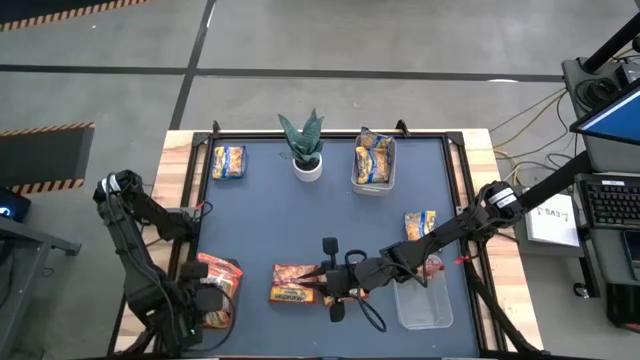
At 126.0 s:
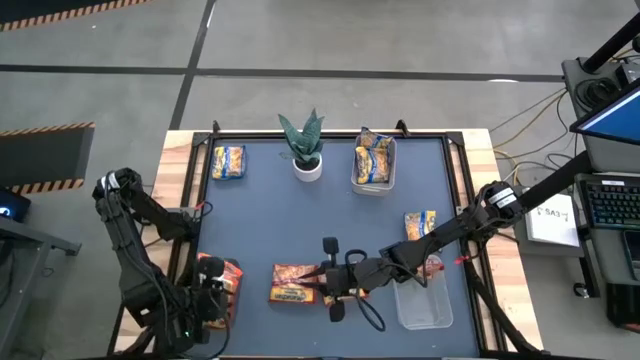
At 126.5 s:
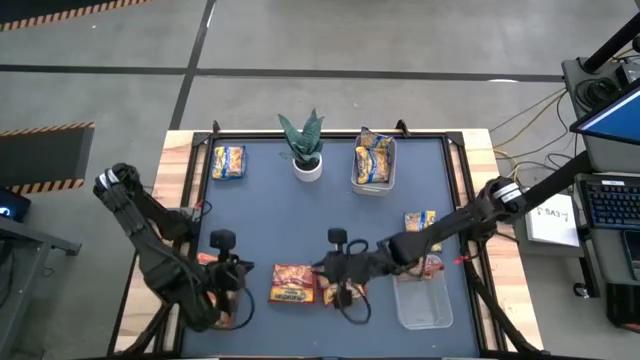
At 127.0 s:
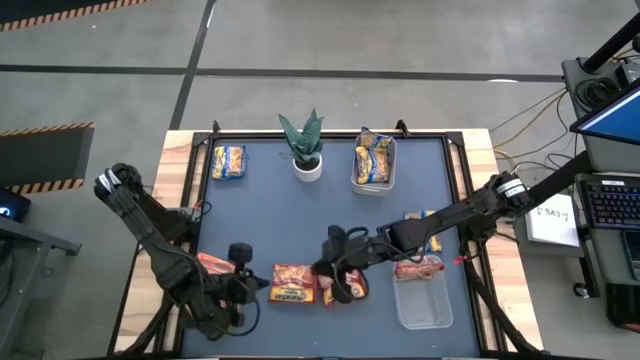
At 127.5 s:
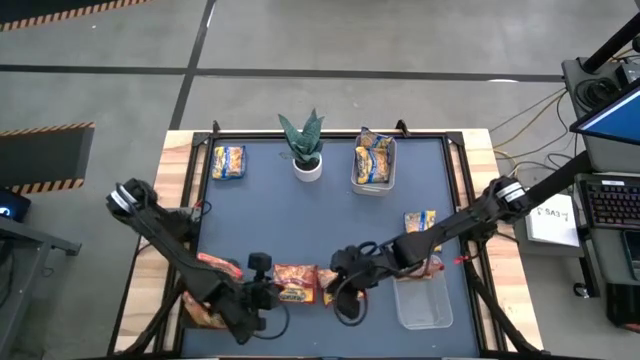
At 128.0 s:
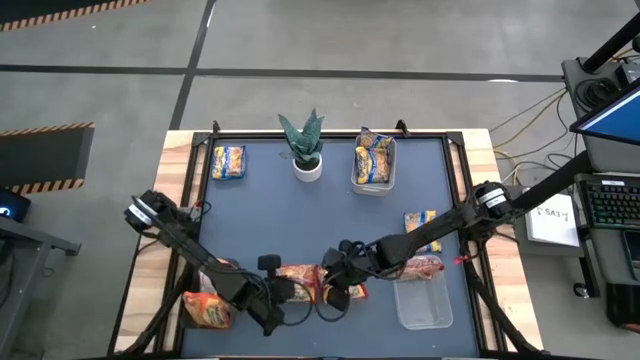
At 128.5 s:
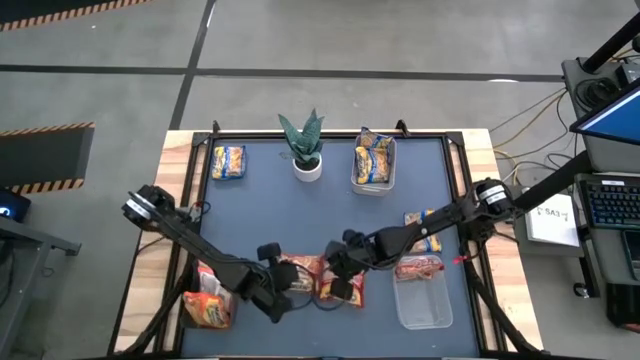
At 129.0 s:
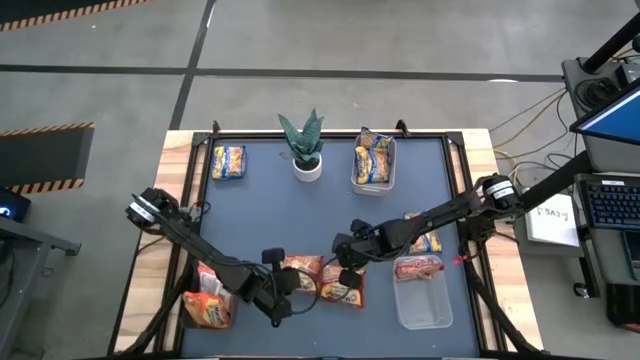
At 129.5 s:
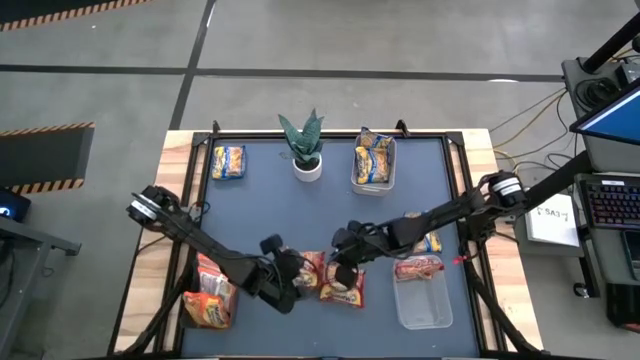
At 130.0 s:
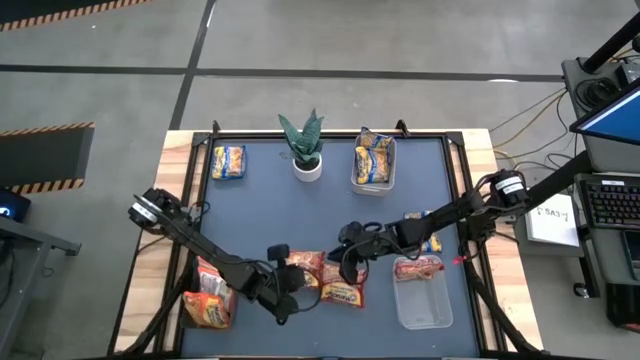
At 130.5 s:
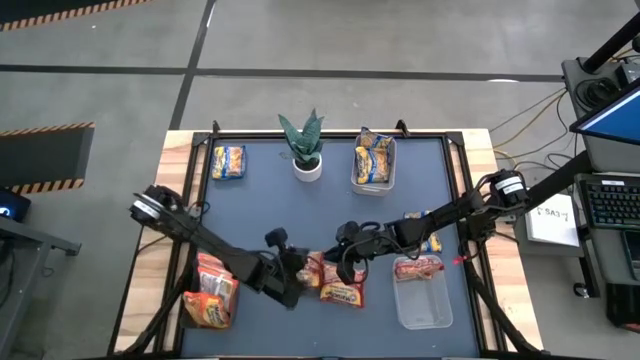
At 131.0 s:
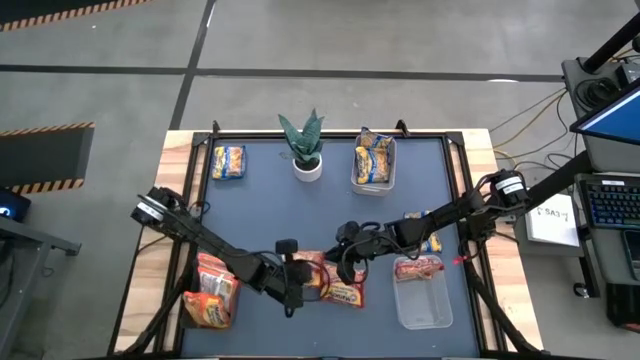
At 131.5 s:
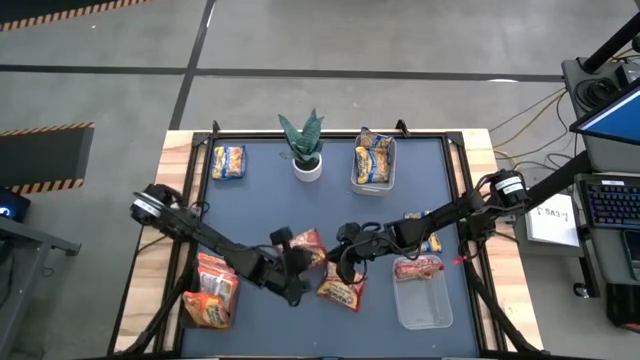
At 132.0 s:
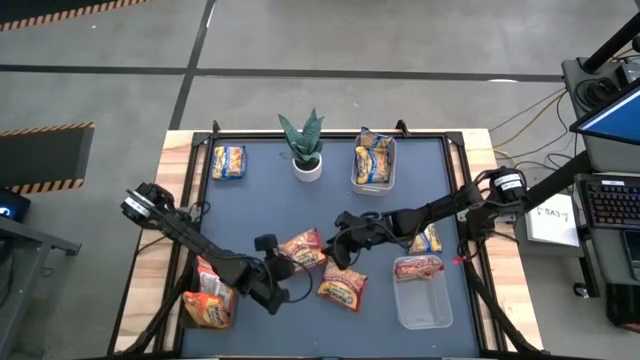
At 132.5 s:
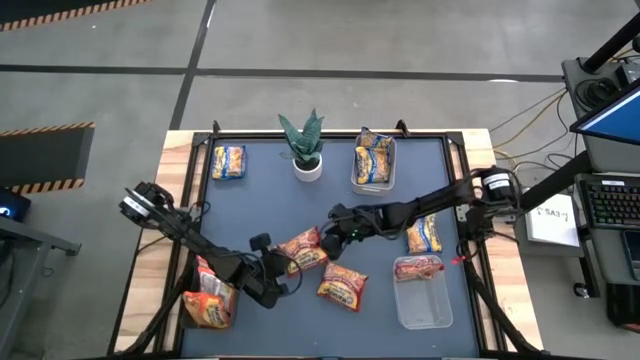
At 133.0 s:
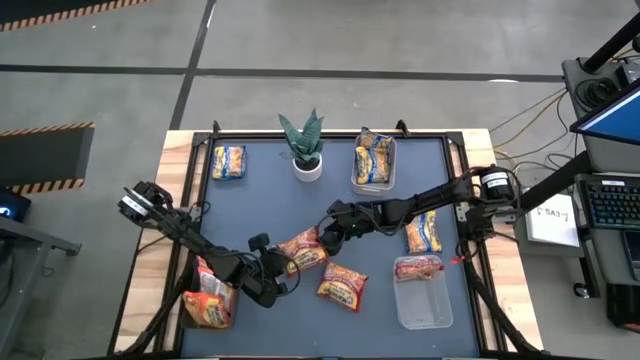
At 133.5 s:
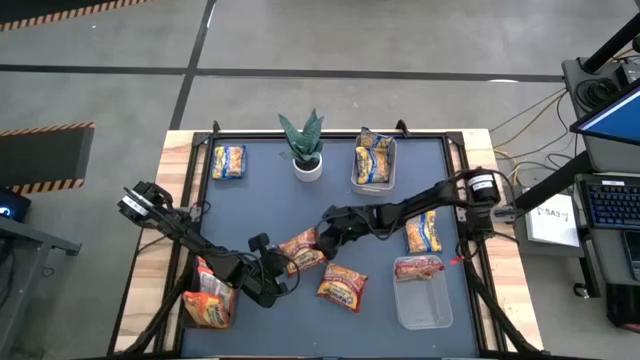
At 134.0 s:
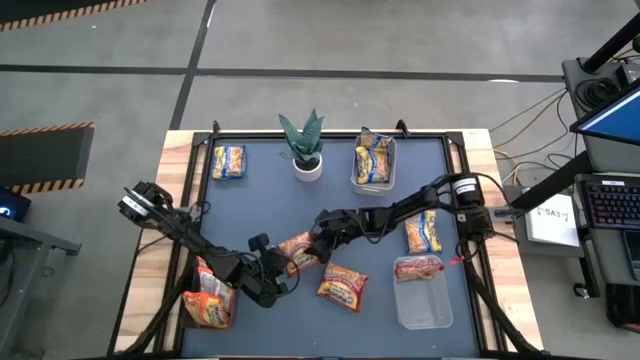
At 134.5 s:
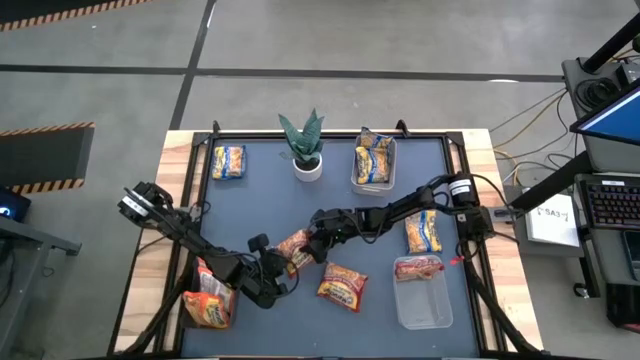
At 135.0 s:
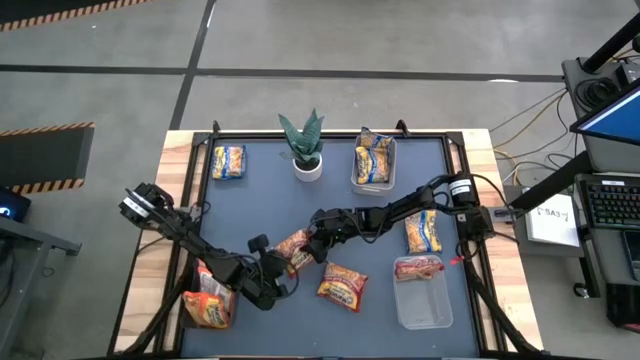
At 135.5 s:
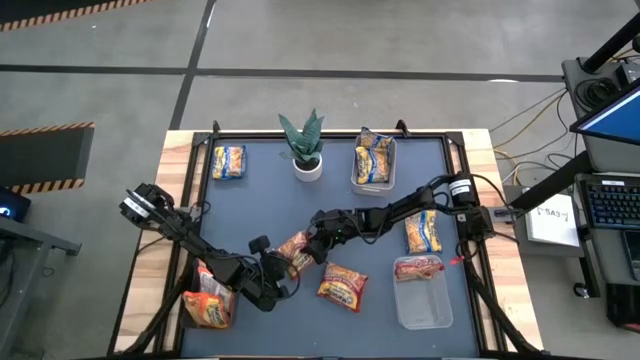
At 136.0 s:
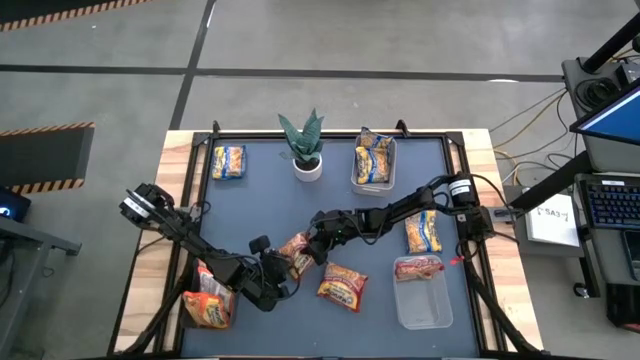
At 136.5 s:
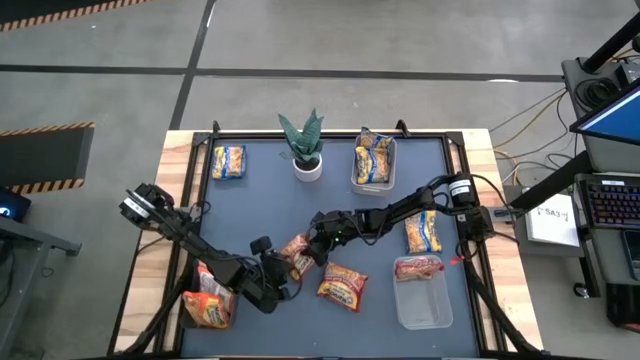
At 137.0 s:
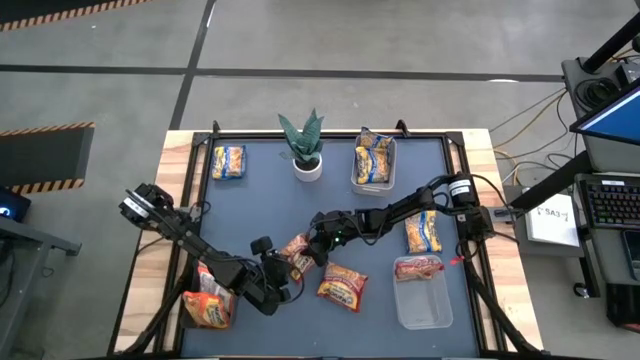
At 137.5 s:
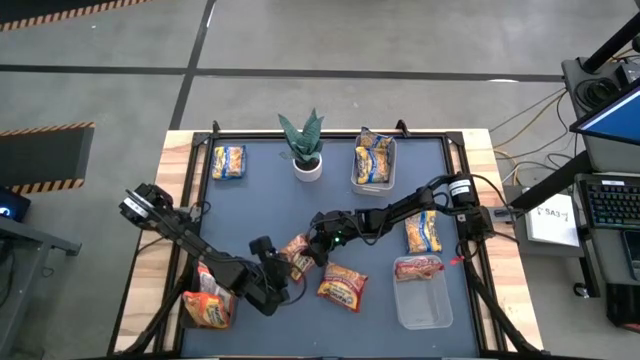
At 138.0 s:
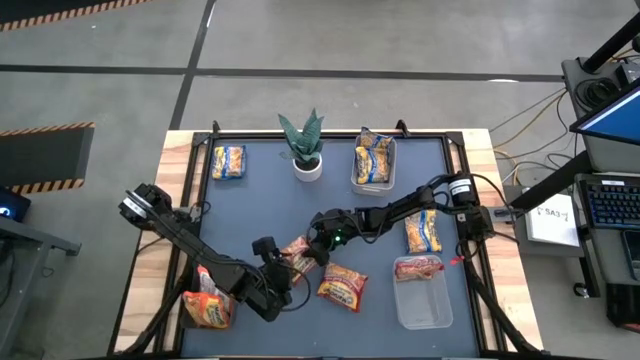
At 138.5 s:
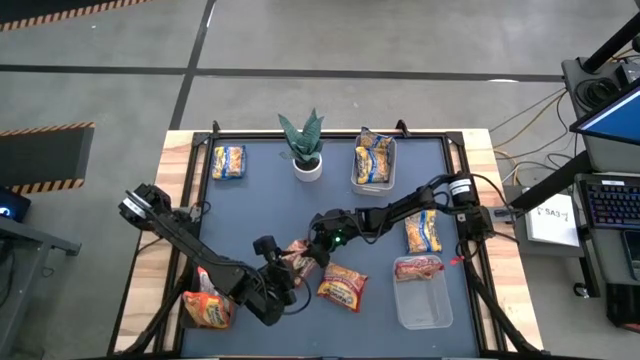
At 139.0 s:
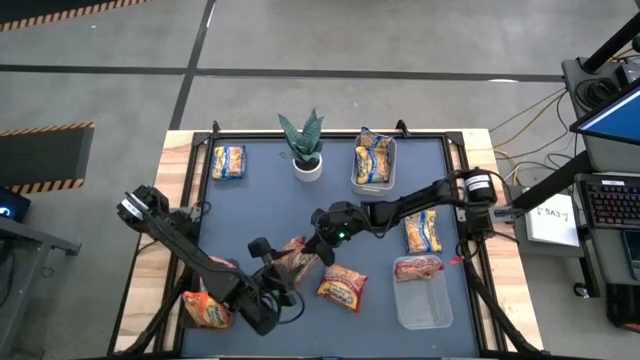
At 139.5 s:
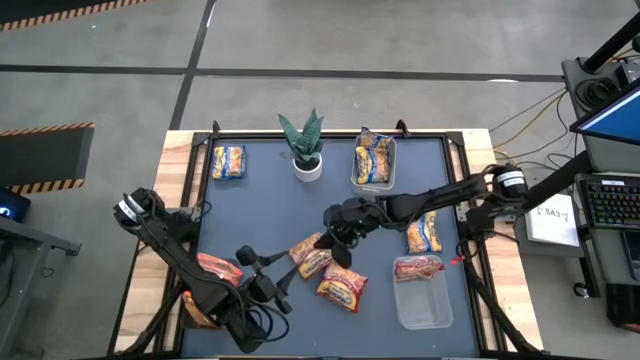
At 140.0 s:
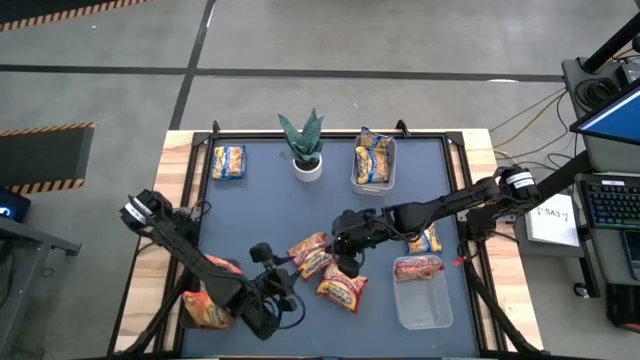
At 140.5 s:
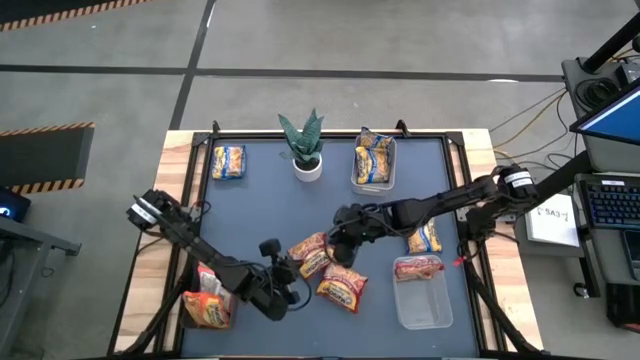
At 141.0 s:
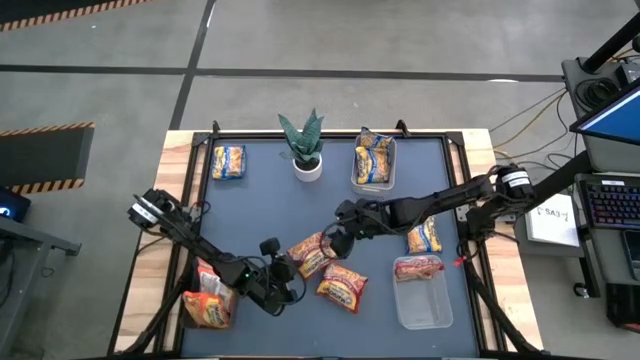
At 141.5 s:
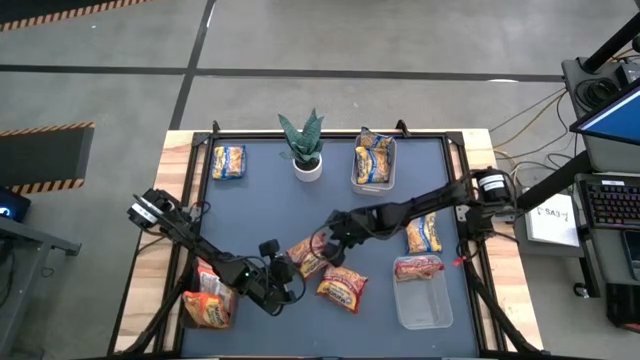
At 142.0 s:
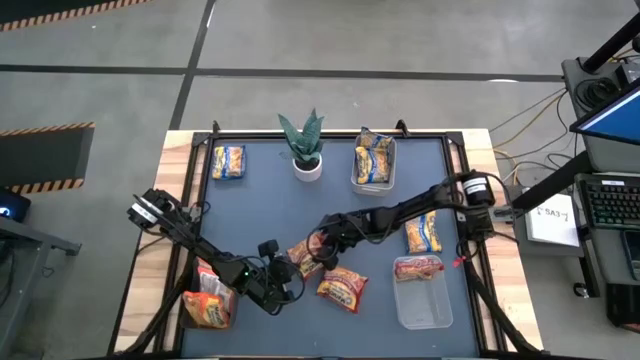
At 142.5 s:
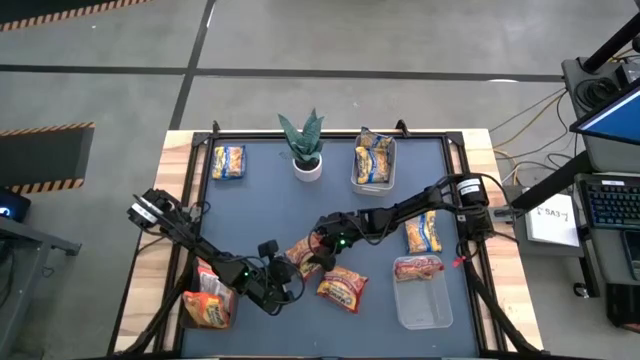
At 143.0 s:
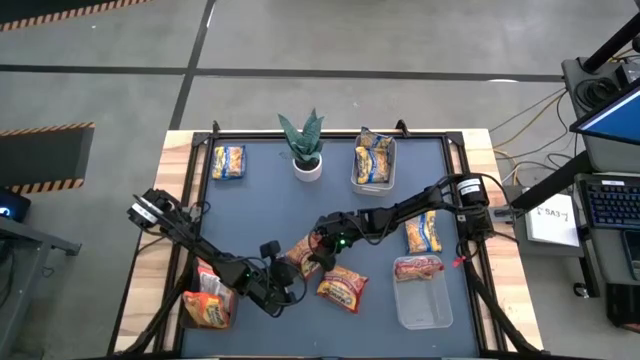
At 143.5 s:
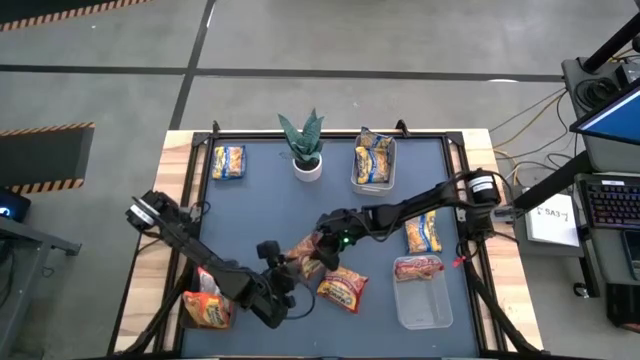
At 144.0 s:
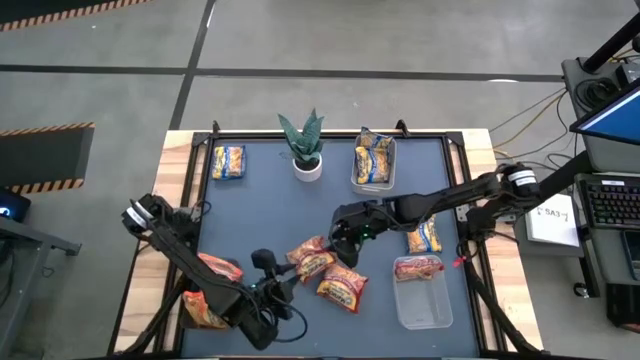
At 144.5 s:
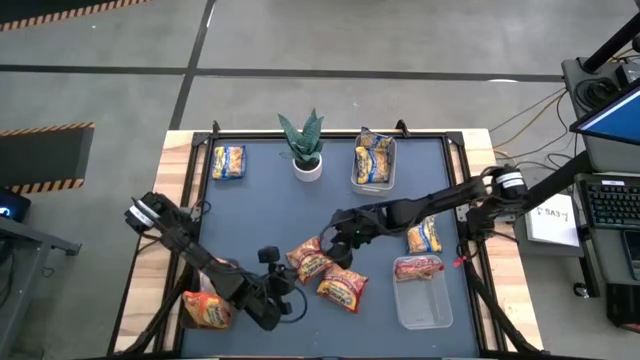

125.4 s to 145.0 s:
Task: Sort Maruchan noodles
Put the left red instant noodle pack into the transparent bin

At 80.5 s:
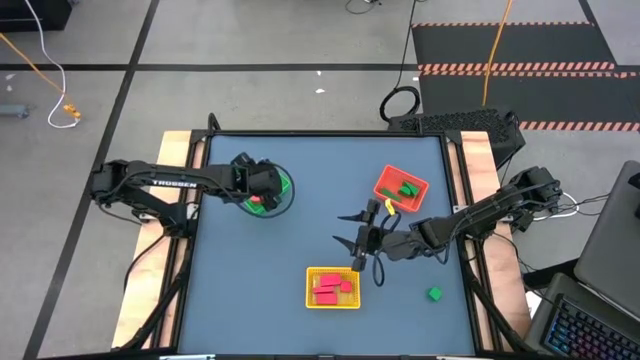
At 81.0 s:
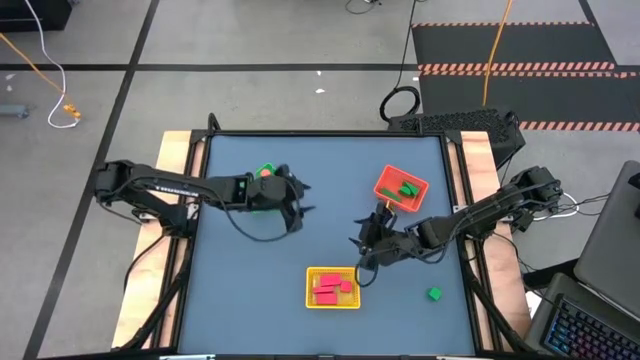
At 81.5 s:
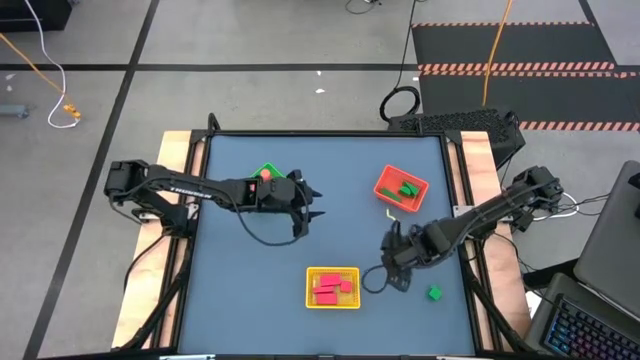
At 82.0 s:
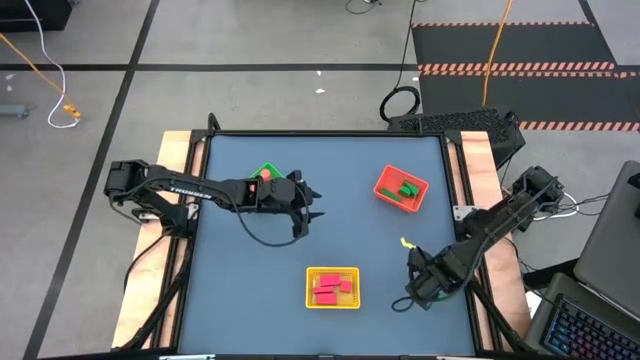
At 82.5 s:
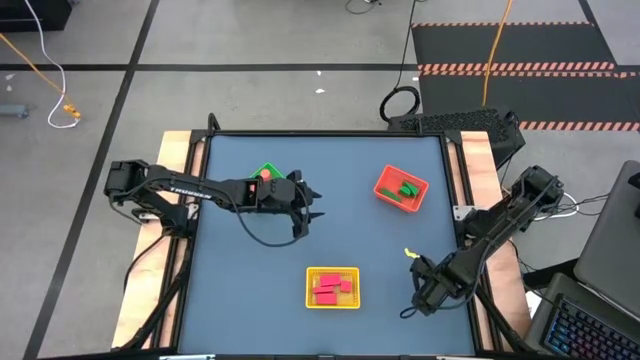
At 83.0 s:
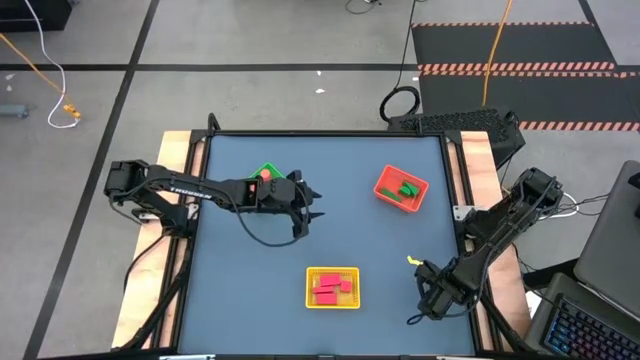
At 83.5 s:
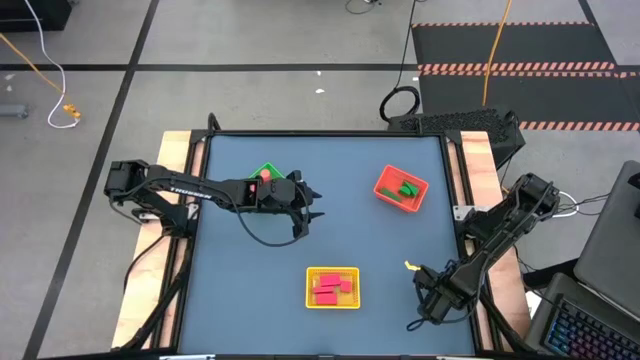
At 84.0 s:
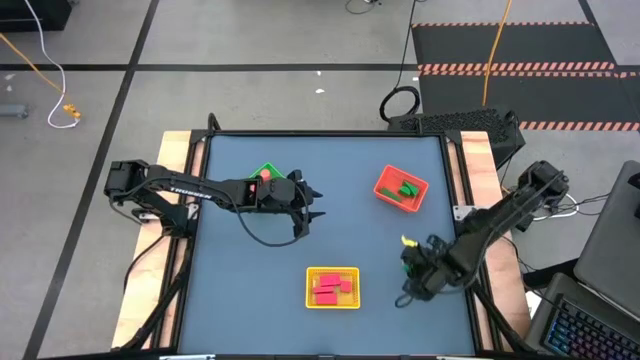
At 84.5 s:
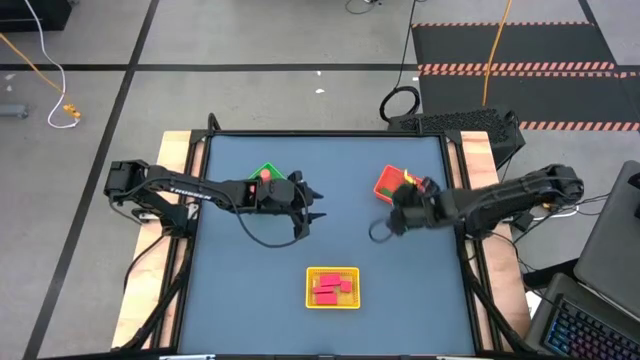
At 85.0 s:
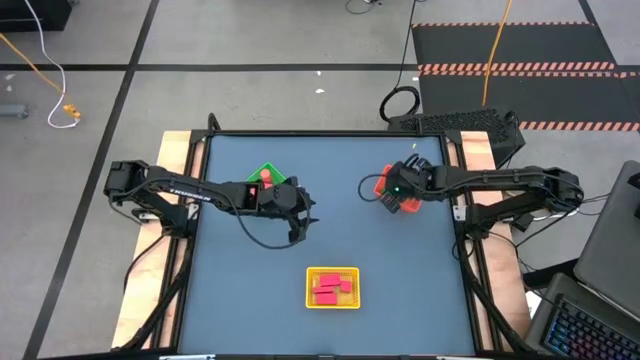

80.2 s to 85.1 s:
Task: Sort & place blocks by color
Put the green block into the orange bin
